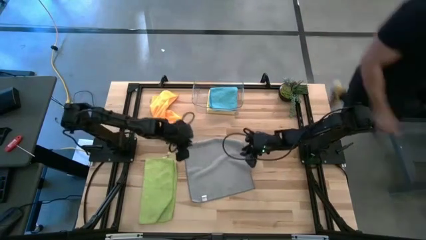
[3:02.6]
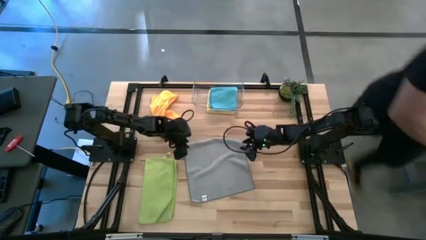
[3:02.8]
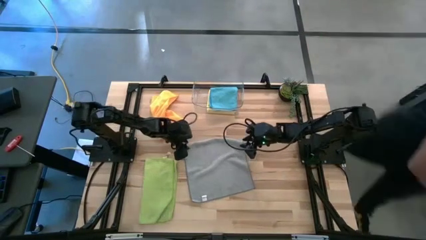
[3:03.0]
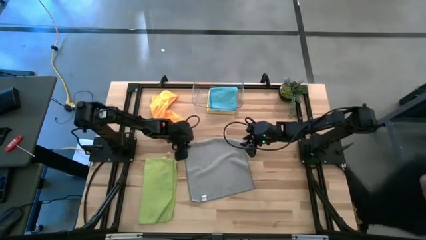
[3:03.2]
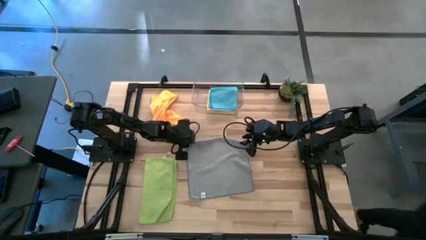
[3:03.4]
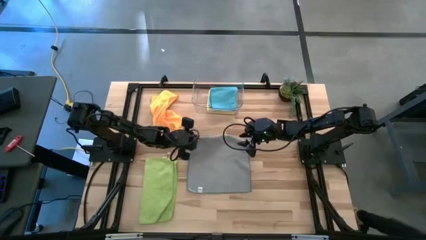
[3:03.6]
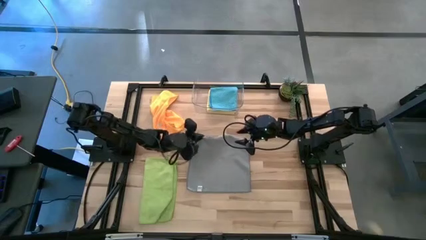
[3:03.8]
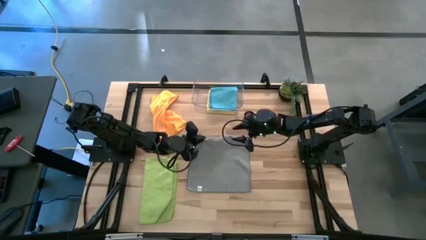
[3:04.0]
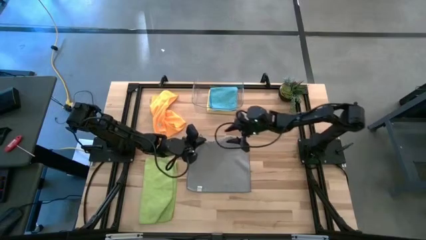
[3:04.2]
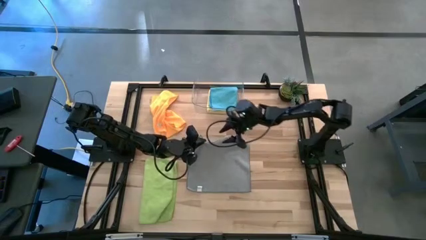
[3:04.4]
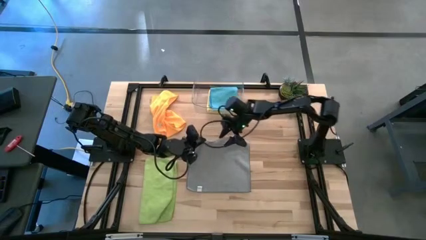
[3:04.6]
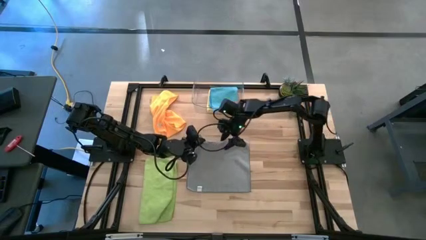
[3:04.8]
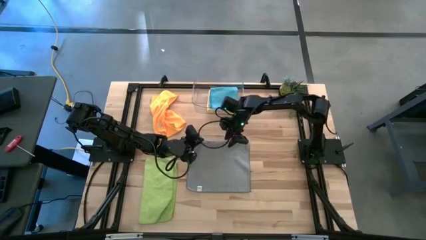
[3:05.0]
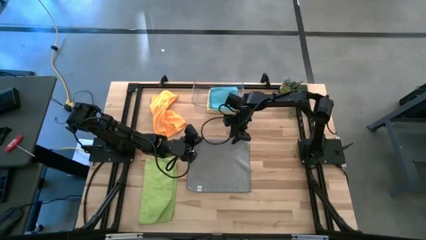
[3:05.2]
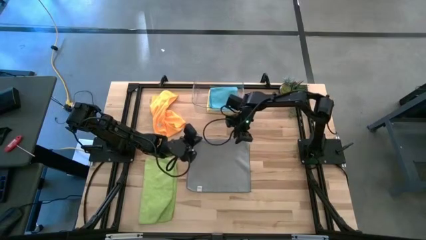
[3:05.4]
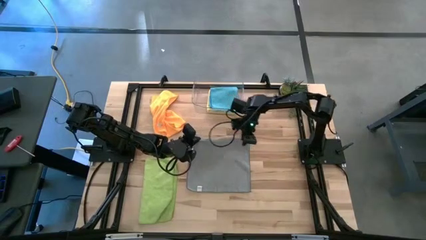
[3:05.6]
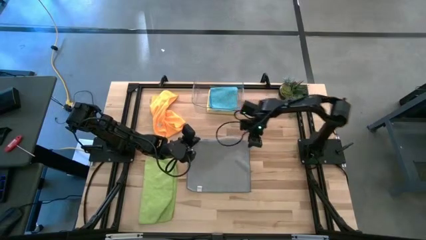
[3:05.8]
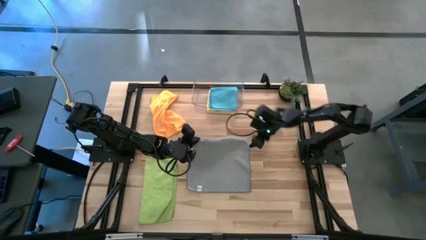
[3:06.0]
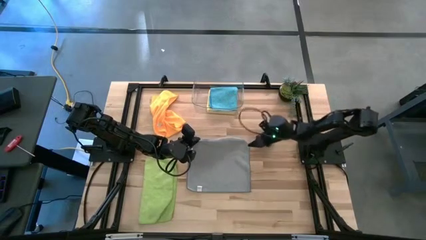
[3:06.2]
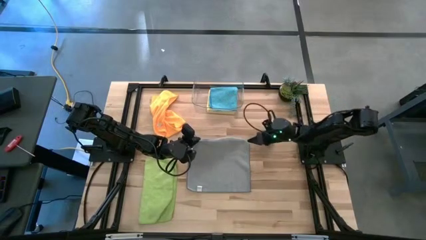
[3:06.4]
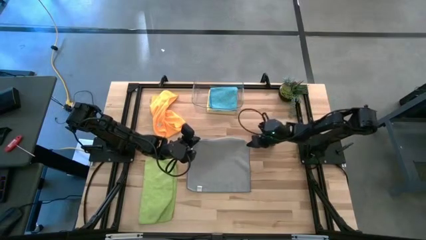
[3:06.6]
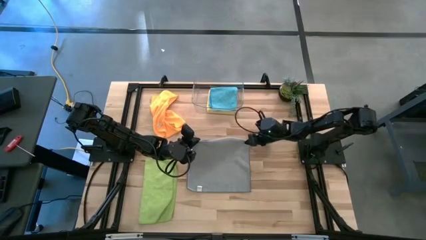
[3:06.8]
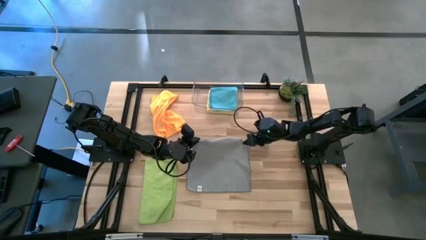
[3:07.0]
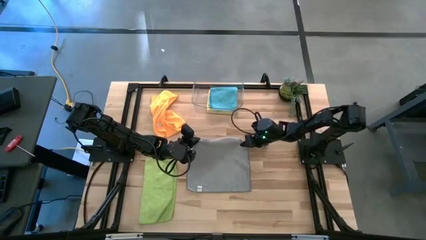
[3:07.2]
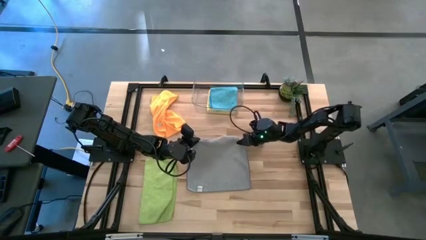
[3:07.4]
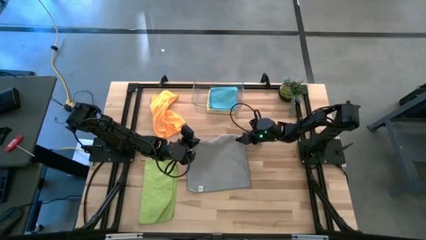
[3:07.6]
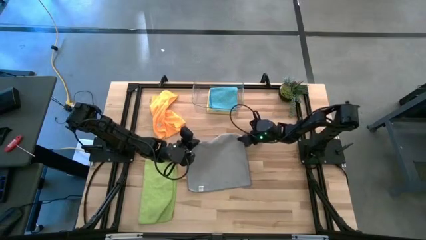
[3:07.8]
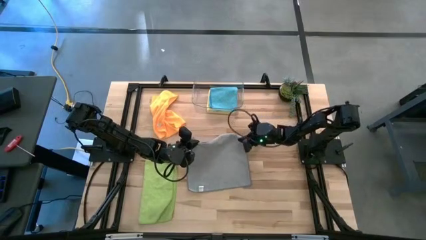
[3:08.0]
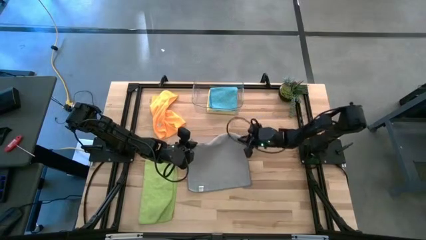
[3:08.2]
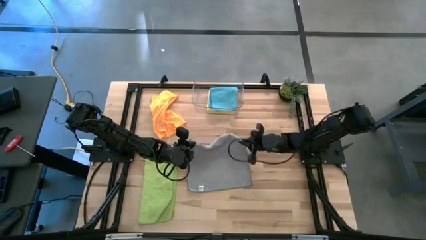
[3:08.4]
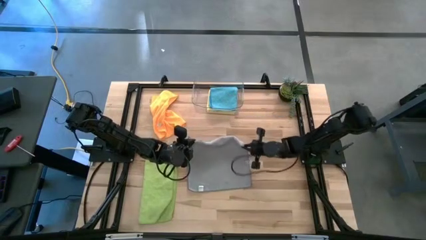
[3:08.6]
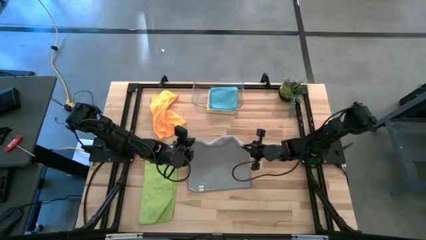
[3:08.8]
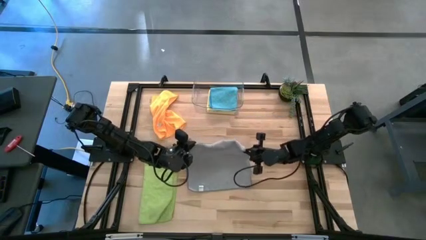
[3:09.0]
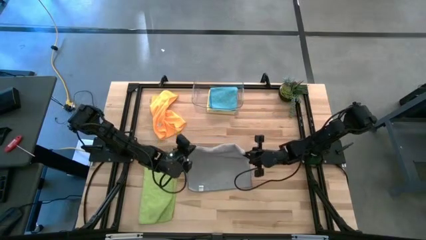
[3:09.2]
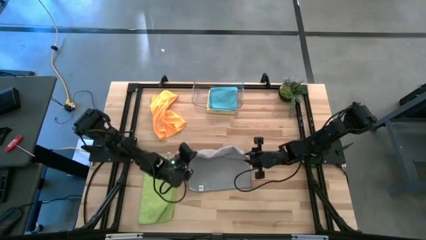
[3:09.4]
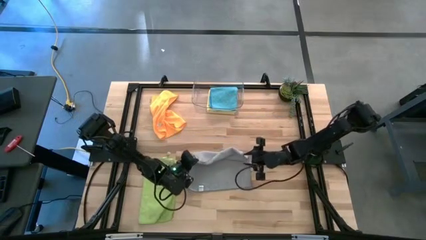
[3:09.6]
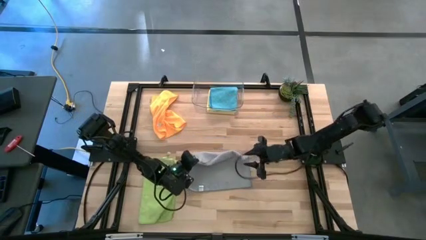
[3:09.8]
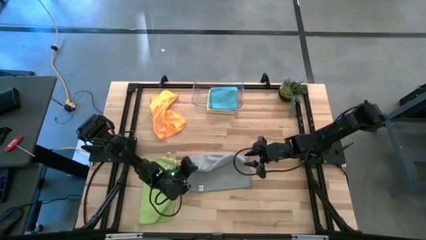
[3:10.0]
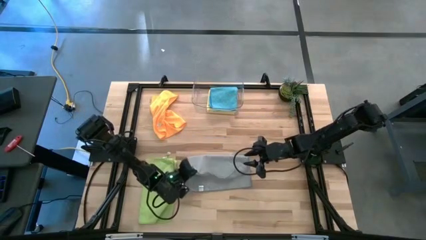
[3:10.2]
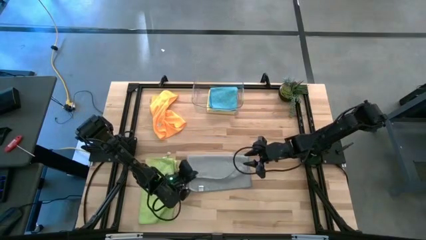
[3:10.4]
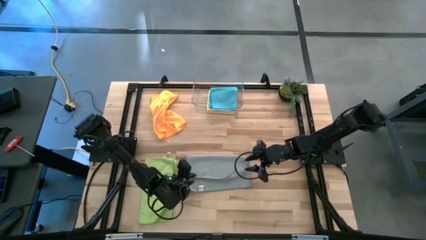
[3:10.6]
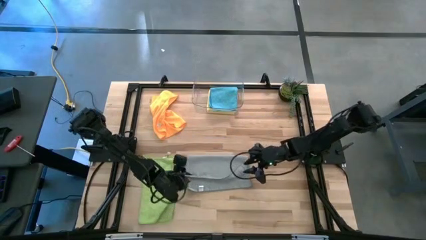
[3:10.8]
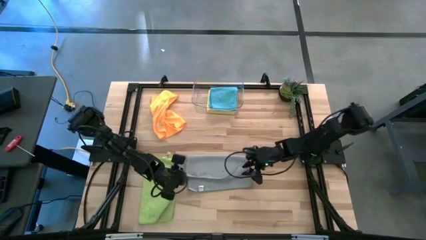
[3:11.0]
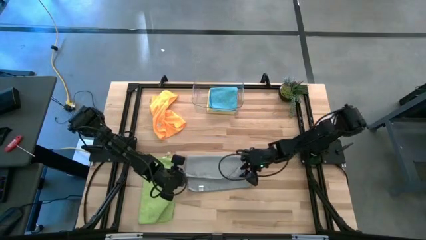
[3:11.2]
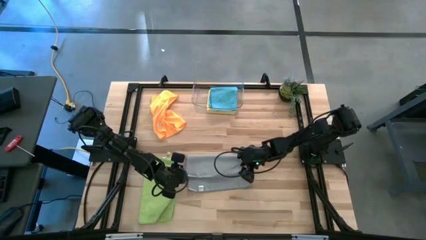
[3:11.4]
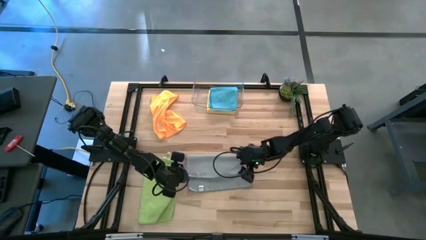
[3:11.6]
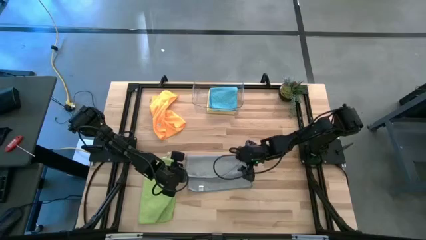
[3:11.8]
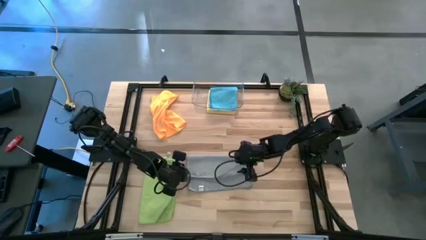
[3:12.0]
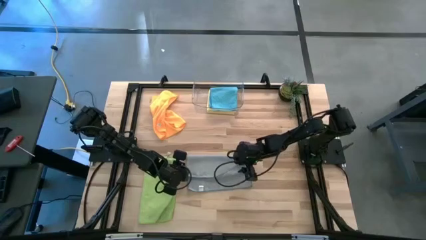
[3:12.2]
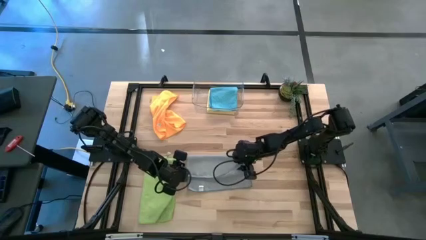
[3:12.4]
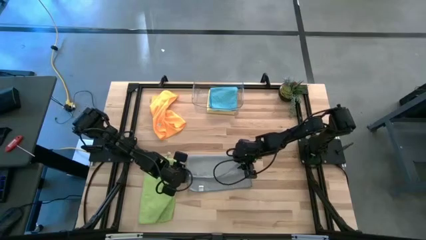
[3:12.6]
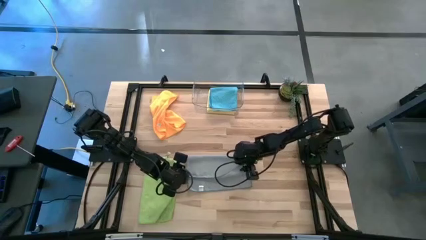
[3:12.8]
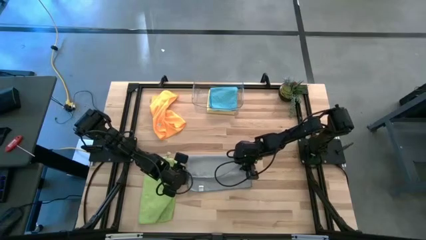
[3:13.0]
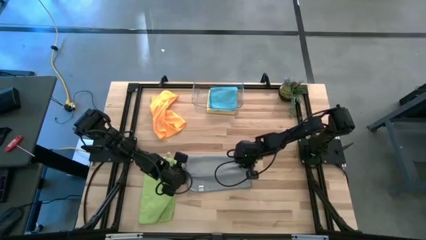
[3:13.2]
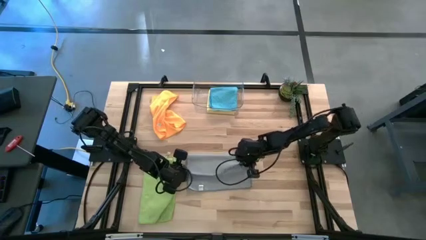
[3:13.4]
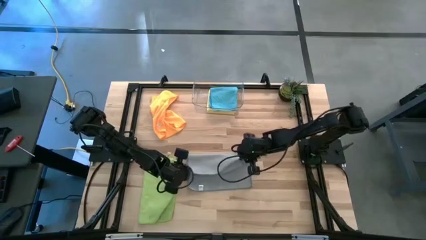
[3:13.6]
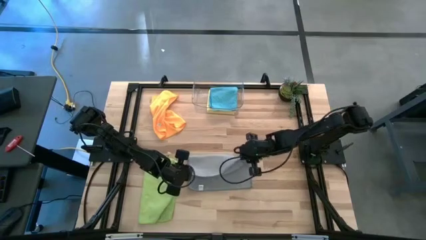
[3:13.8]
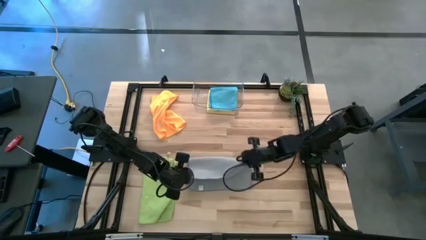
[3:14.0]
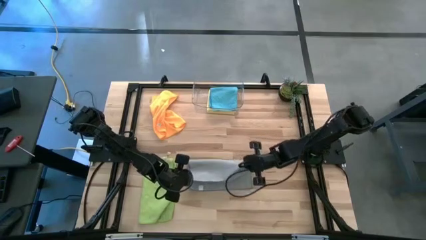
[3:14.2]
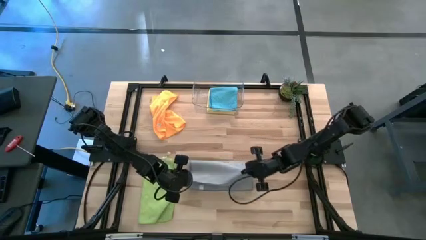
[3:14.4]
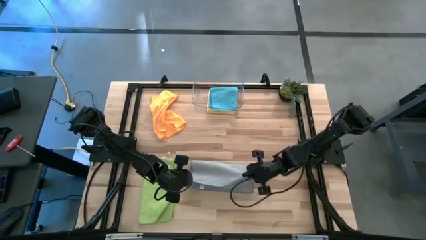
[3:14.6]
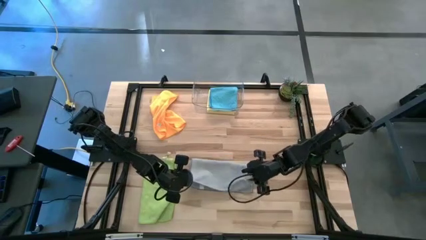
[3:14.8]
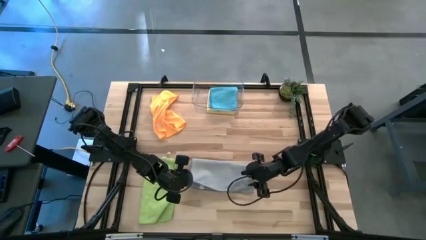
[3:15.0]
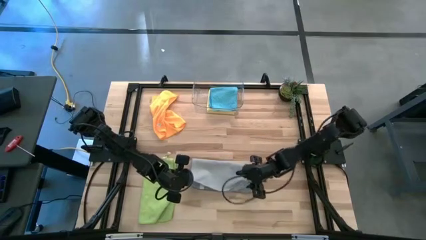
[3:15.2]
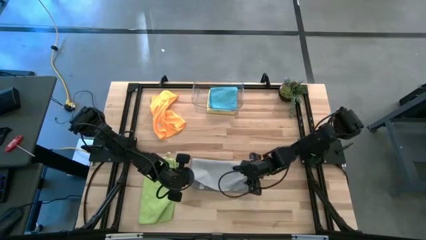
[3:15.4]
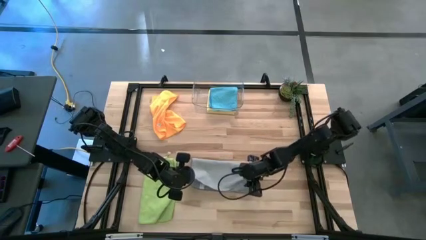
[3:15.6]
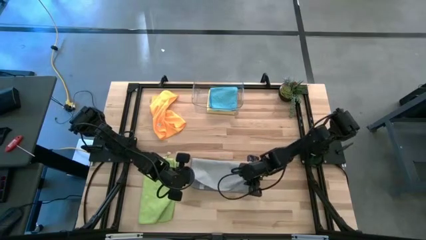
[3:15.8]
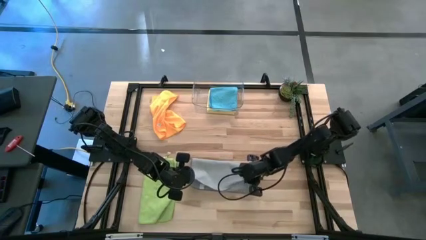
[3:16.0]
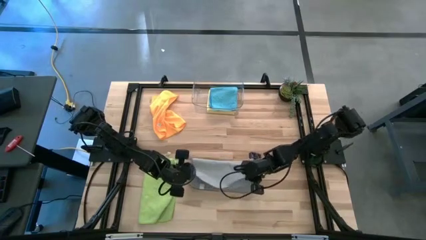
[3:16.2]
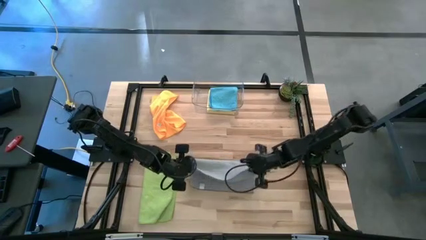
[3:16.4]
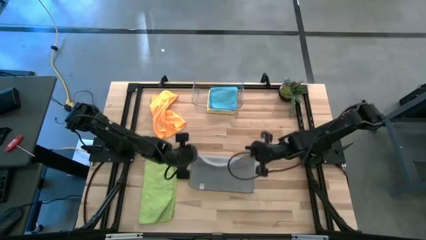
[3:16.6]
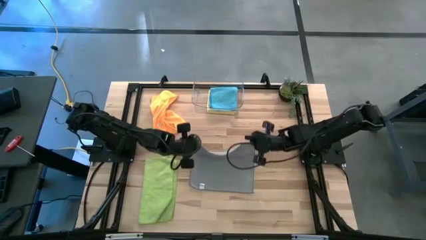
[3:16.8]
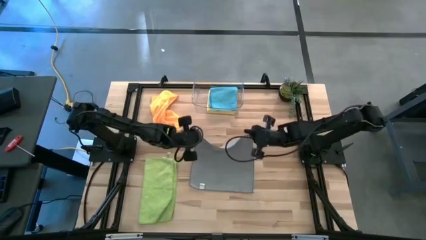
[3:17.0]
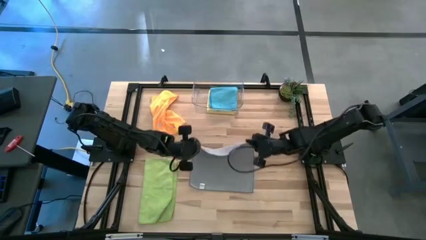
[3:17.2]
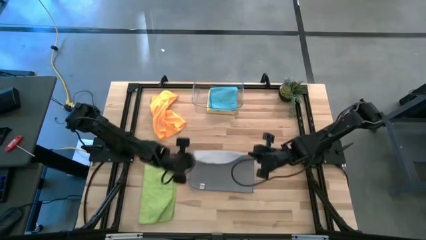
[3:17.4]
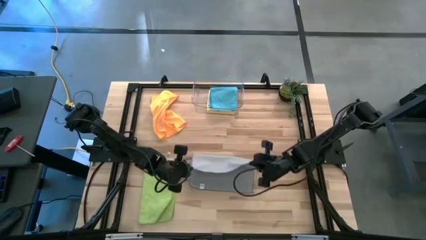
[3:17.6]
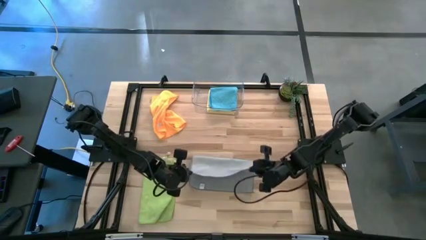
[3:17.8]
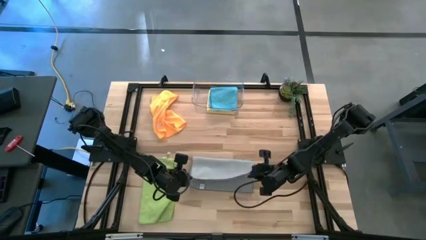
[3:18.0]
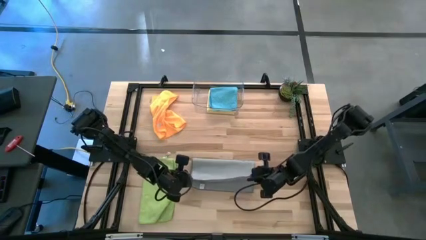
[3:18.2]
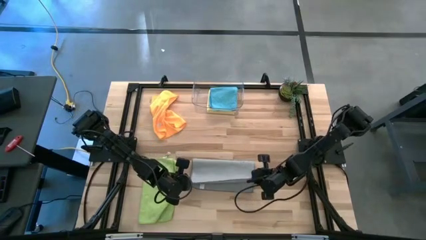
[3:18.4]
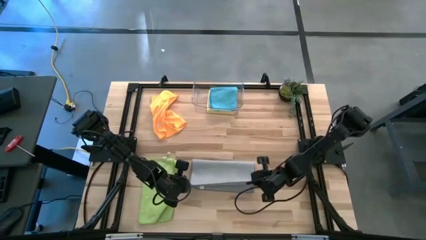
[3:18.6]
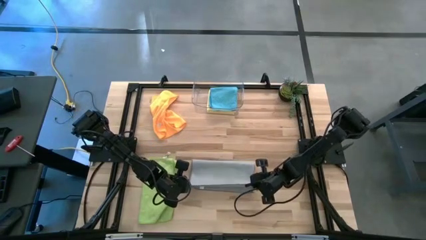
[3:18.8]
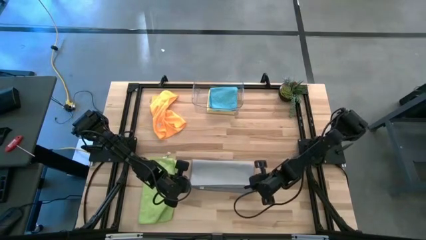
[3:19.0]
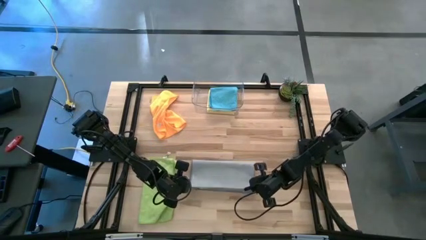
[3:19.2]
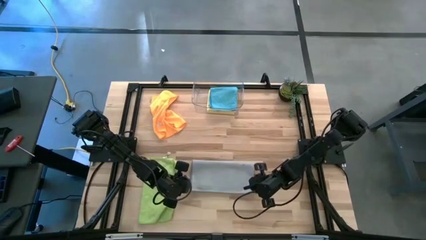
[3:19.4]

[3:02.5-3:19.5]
Task: Fold microfiber towels
Fold the gray towel on the table
